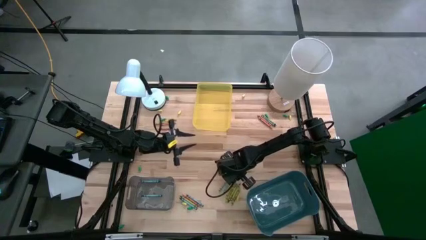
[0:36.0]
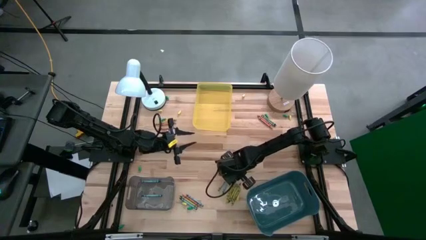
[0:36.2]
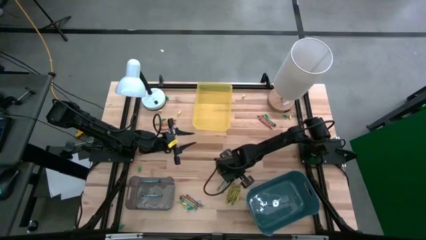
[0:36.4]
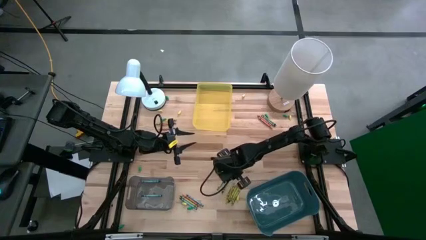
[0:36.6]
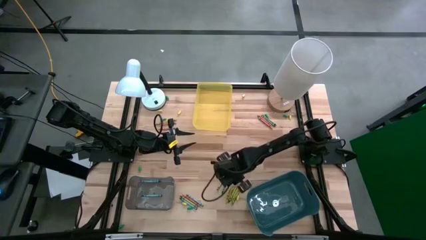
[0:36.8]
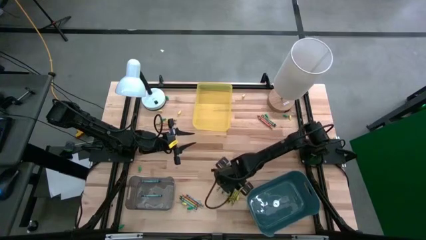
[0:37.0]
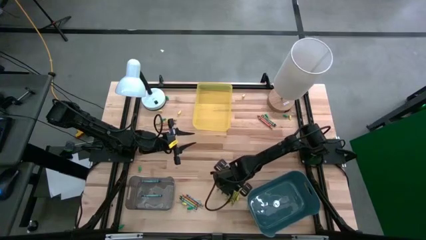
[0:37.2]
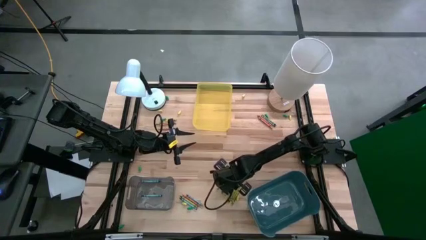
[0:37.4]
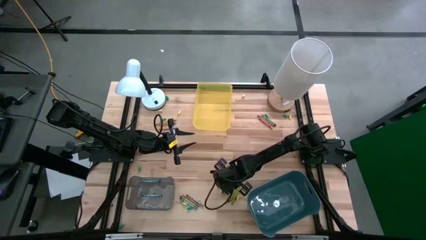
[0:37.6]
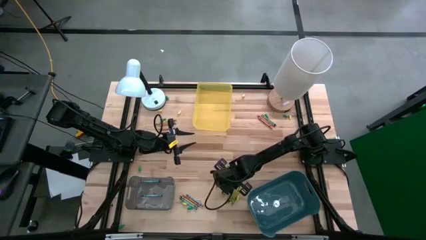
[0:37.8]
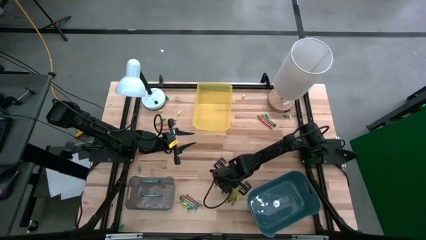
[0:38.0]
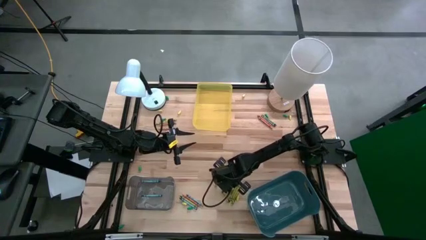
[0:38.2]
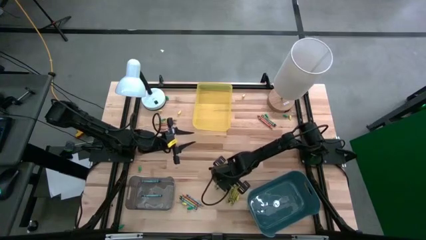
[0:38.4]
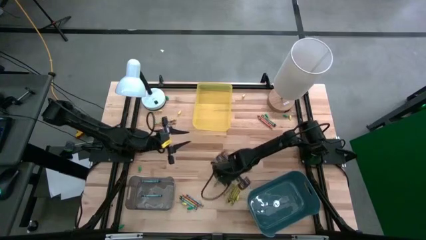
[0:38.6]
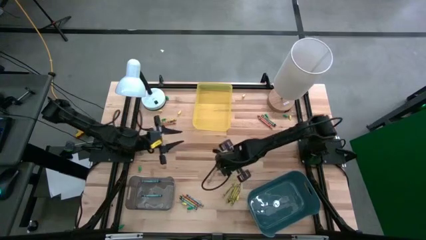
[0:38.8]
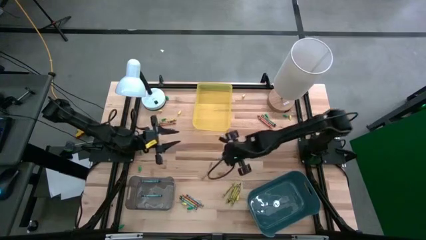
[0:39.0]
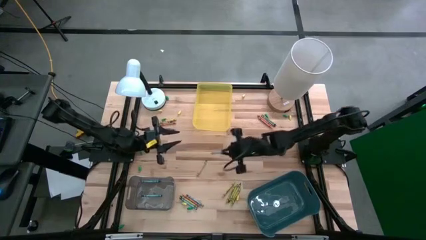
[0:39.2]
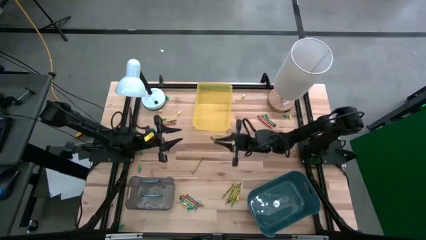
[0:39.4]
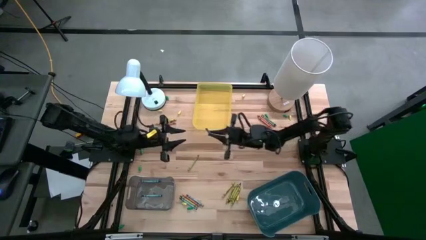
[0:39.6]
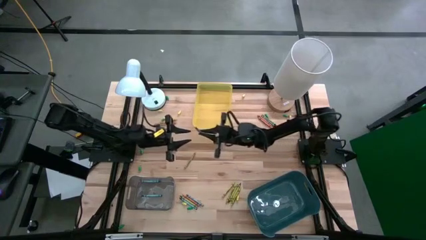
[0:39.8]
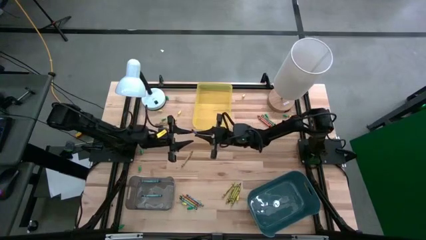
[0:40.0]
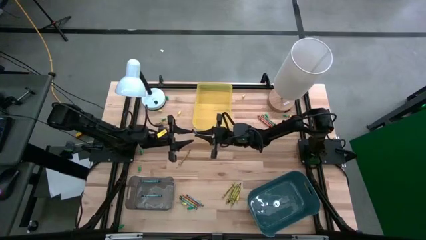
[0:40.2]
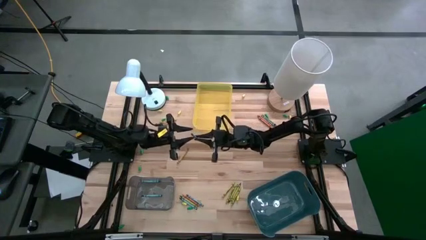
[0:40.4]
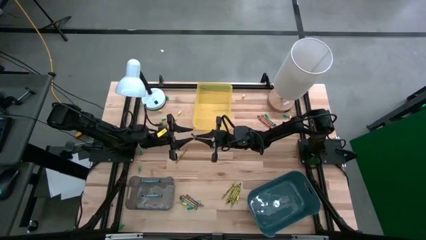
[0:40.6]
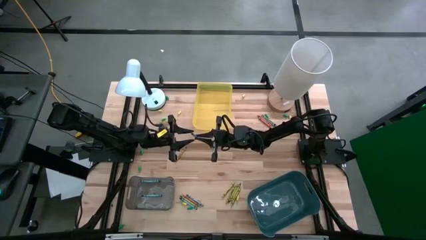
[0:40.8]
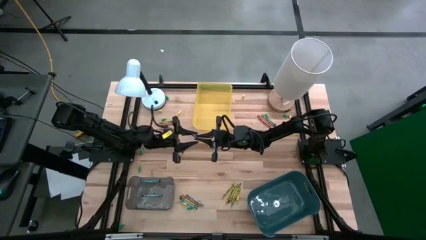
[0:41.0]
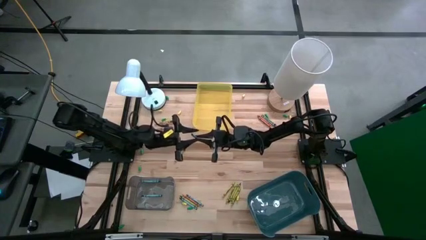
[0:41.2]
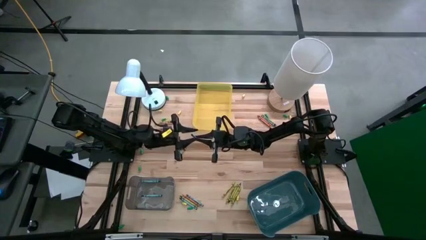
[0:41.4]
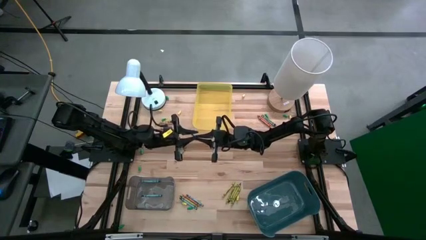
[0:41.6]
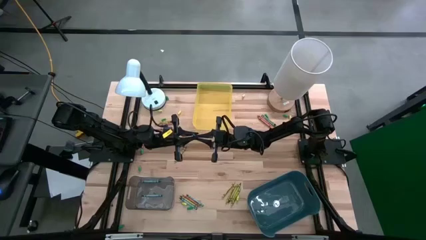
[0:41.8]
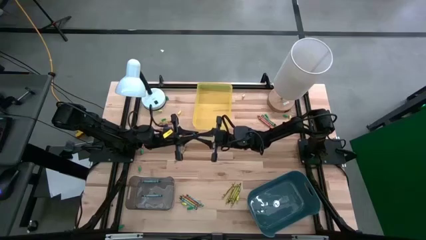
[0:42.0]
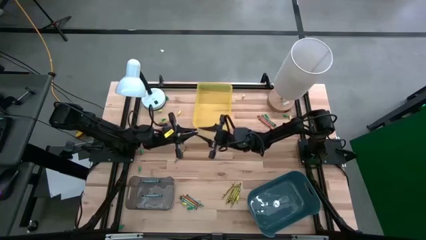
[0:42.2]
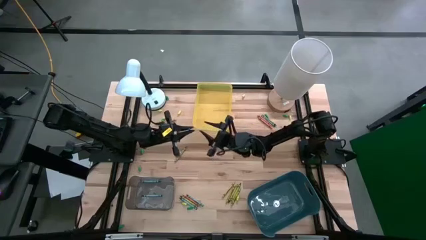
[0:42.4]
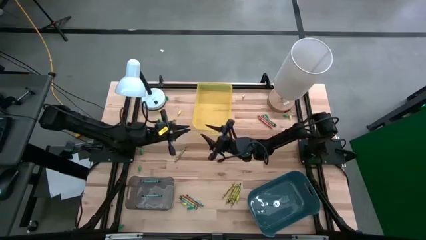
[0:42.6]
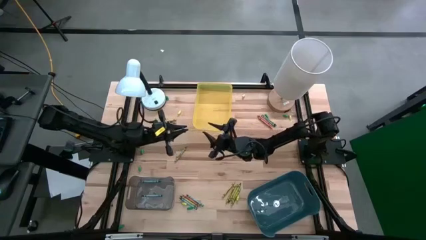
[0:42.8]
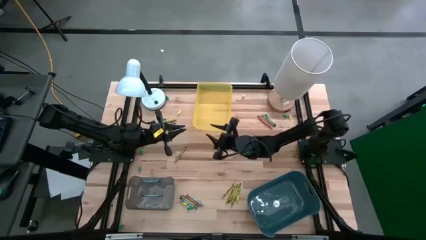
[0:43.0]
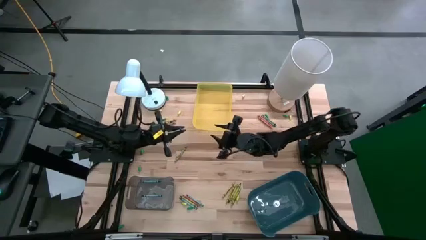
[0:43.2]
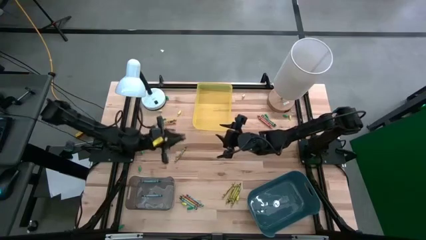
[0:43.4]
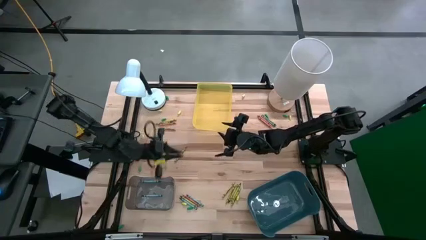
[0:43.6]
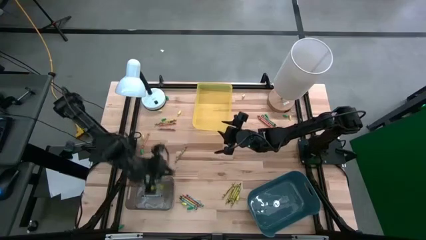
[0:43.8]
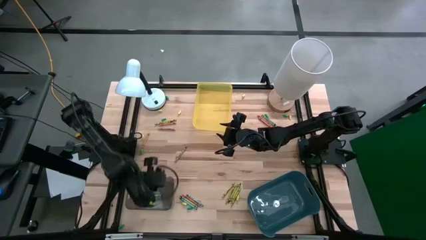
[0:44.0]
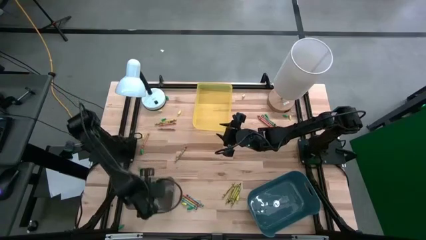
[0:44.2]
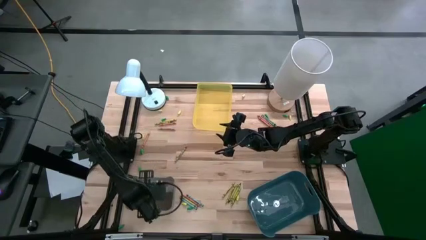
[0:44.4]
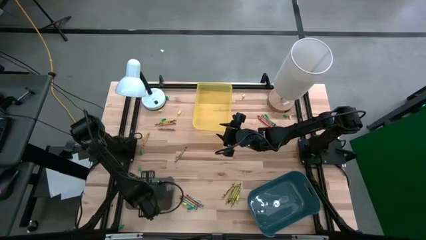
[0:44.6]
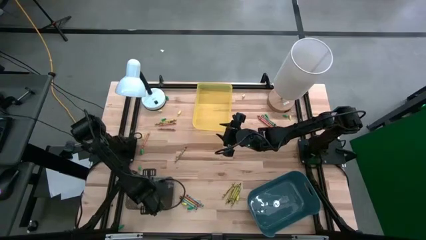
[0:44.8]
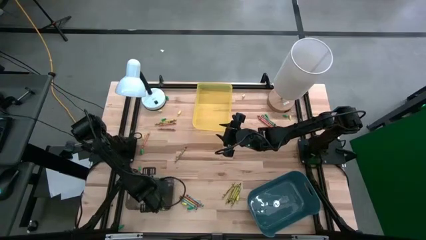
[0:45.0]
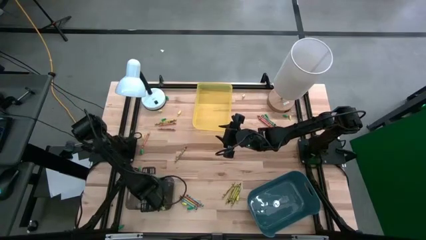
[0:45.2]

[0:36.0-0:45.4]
Task: Sort crayons
Put the blue crayon into the black bin
